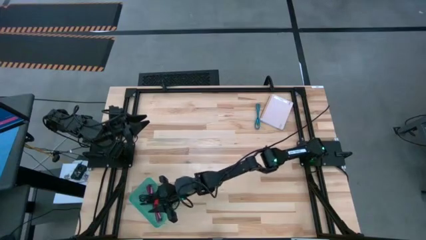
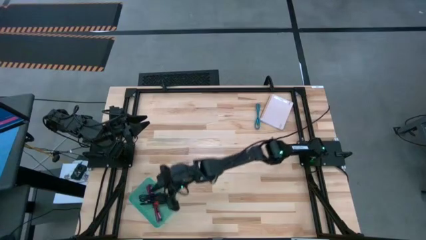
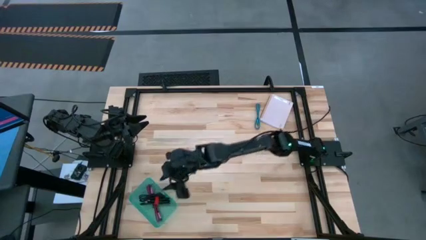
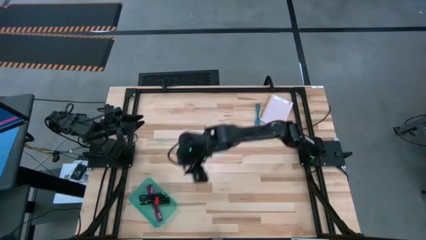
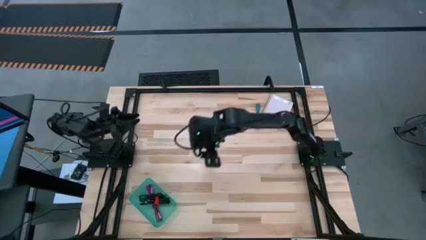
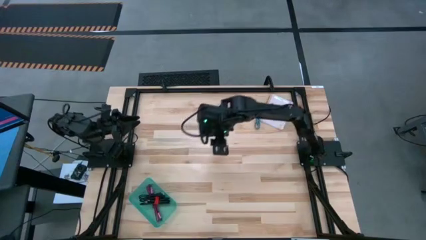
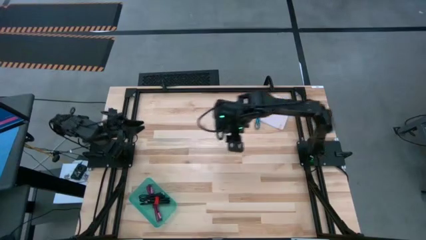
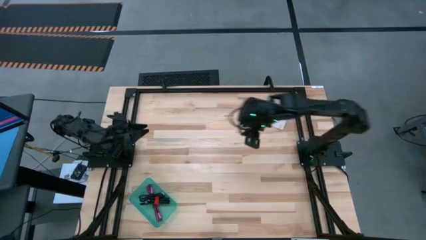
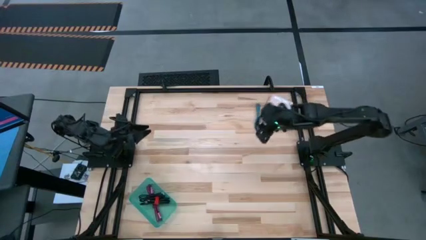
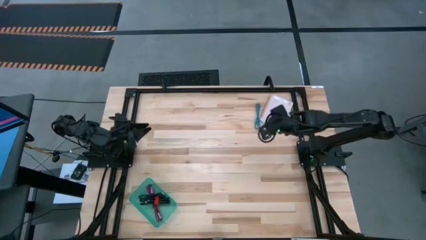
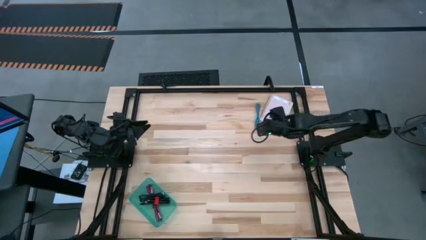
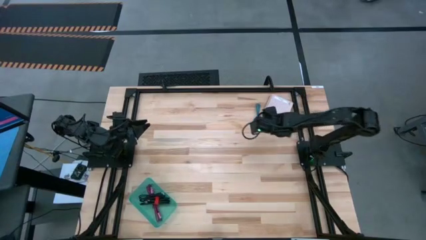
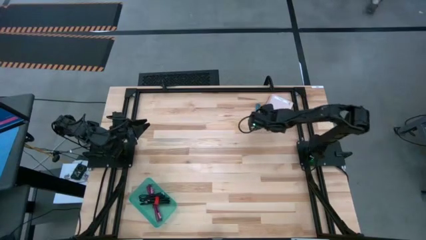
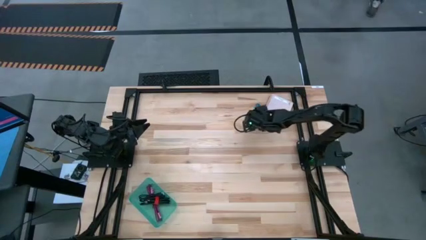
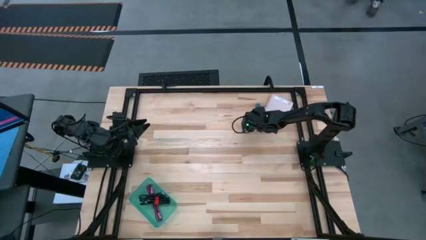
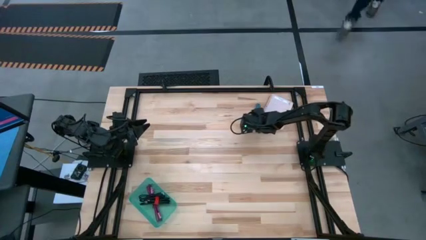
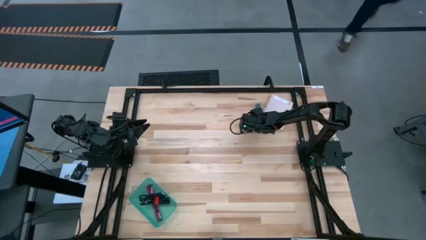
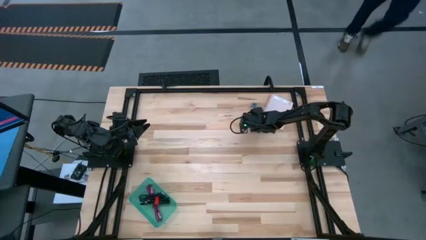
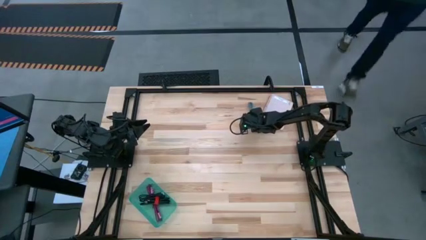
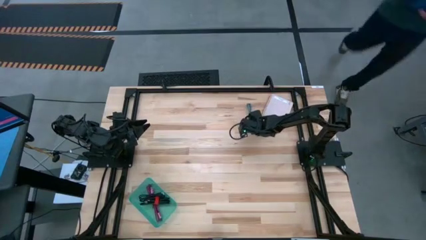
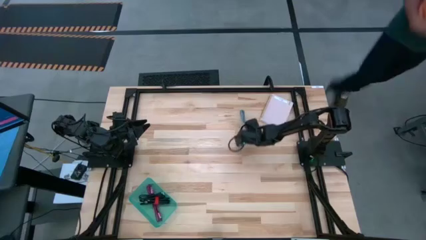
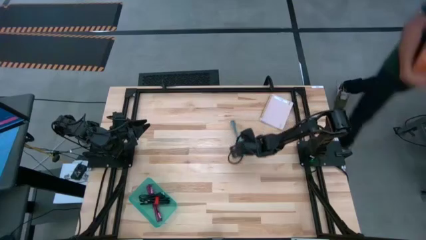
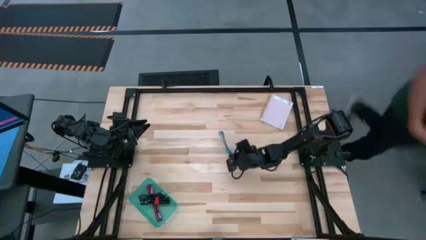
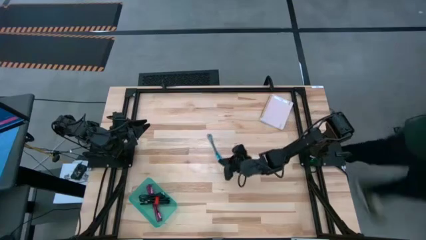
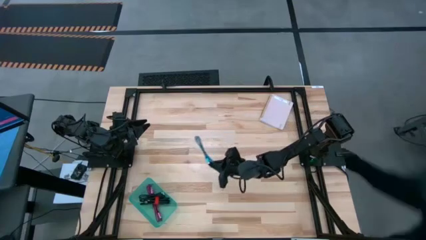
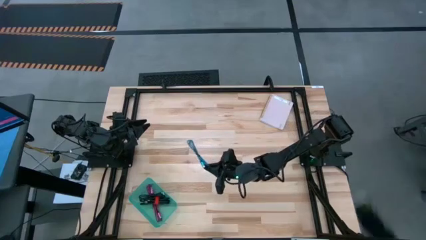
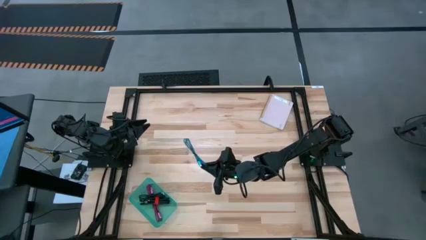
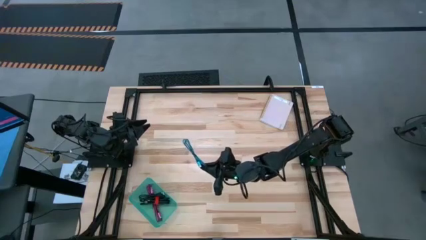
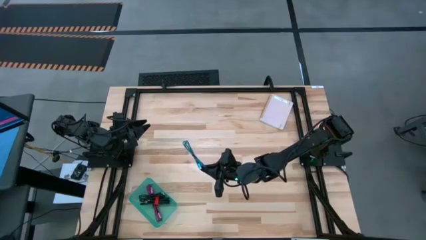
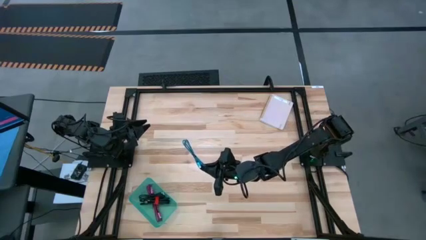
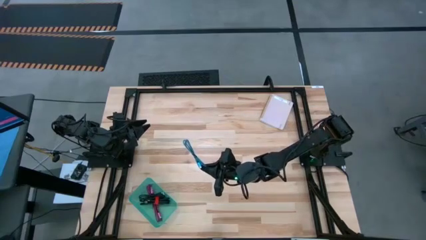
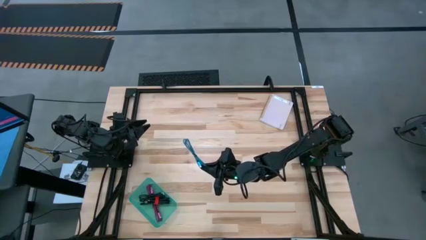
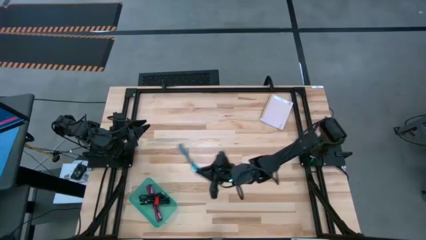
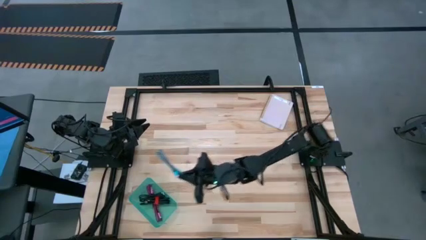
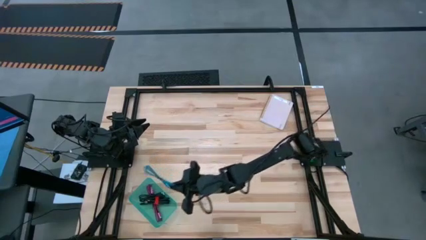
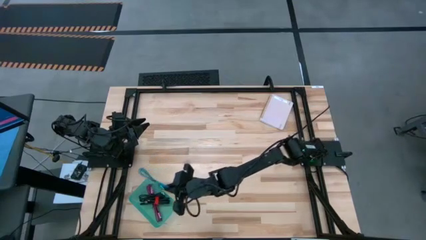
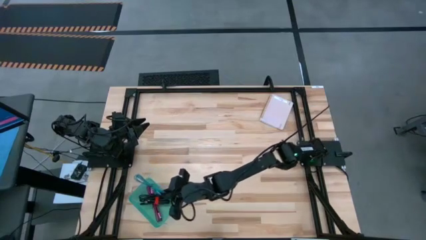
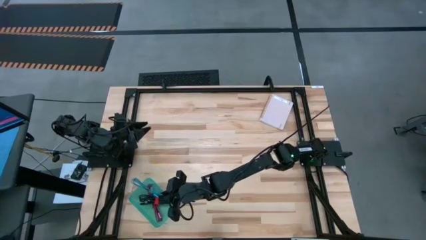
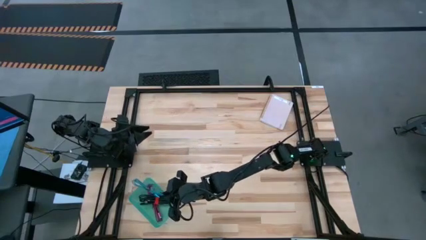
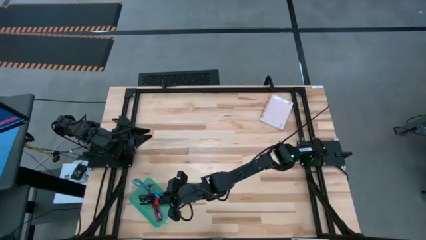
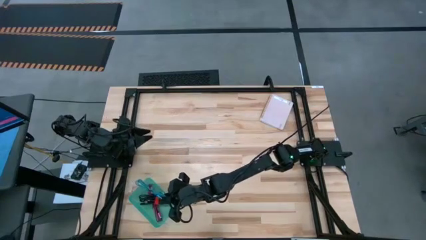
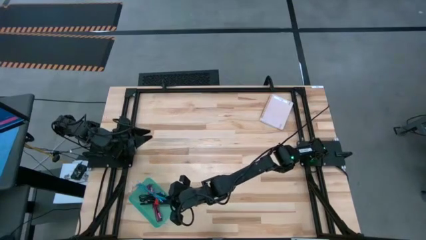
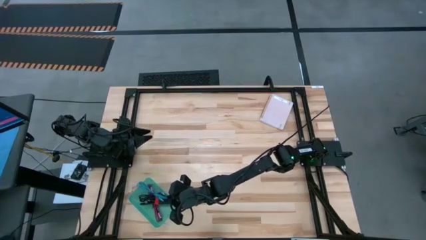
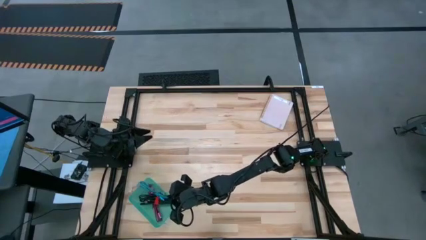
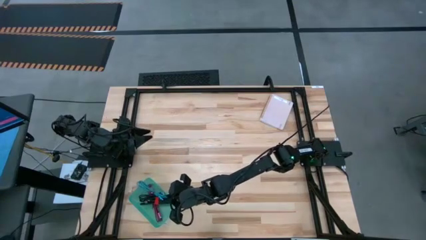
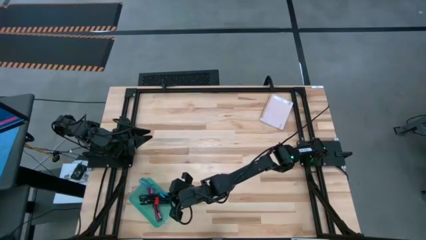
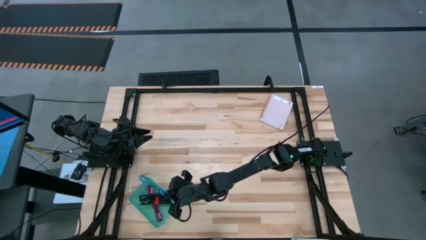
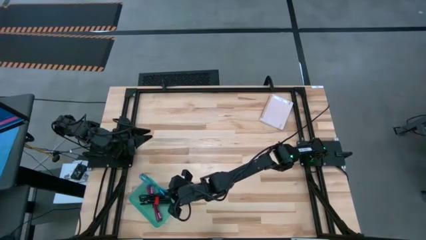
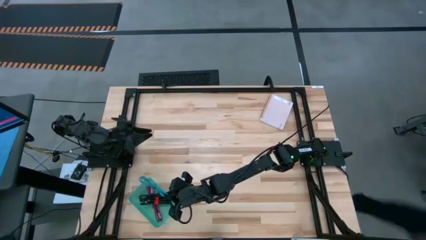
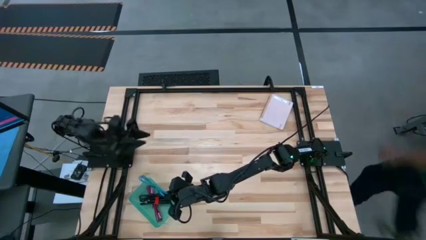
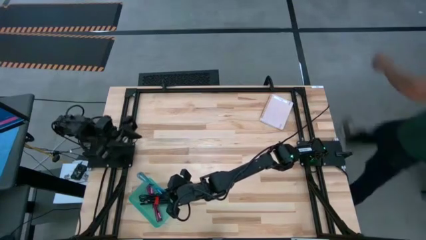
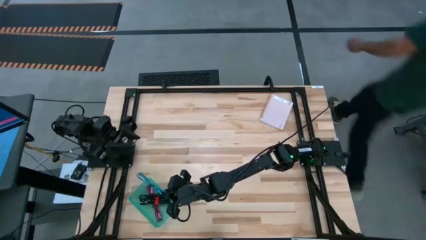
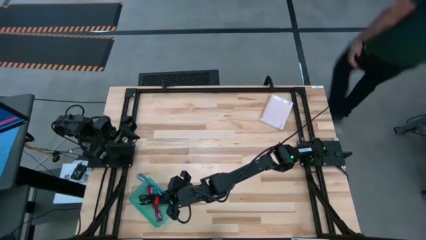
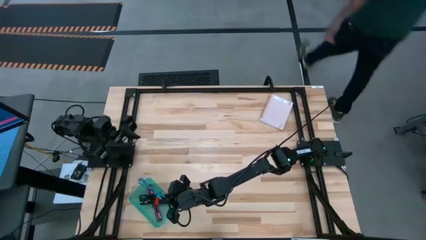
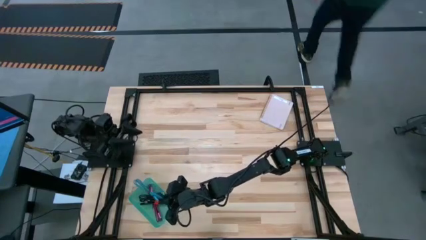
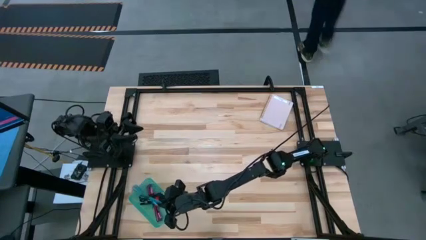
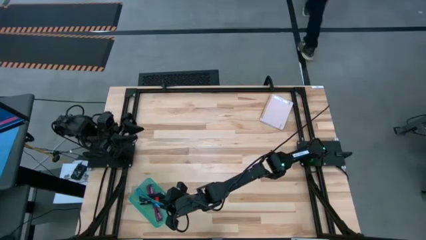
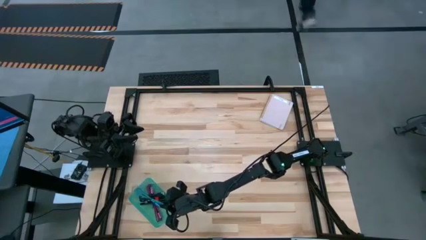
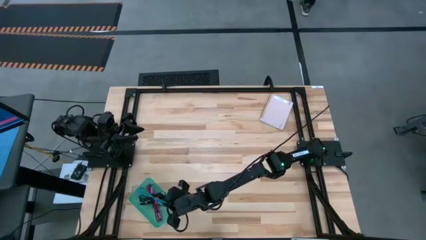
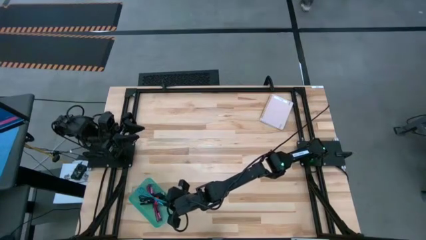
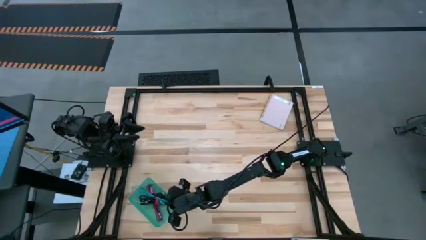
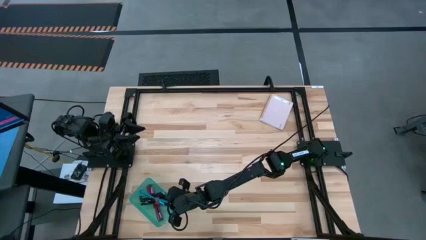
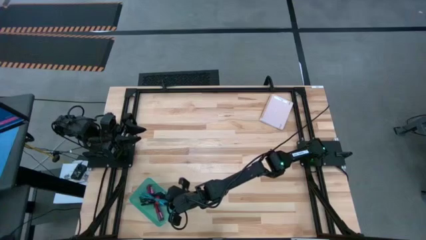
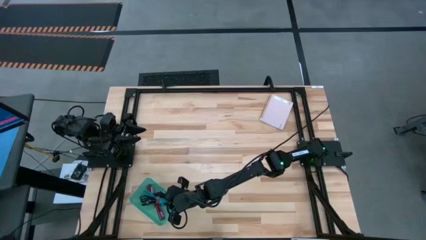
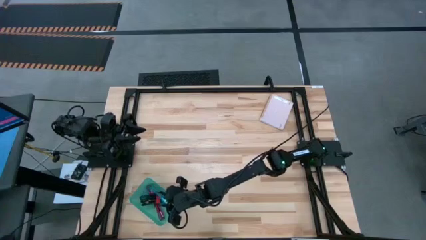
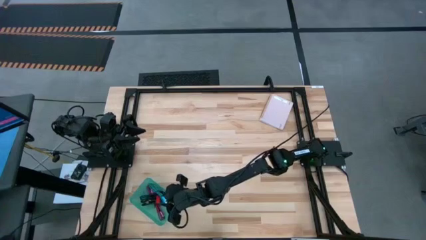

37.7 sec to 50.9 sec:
Task: Pick and place USB-C Cables
Put the blue USB cable into the green bin
